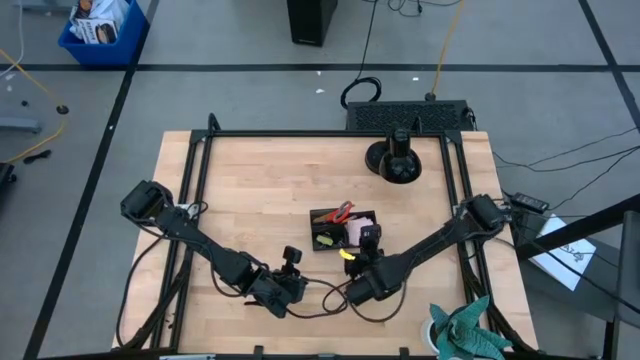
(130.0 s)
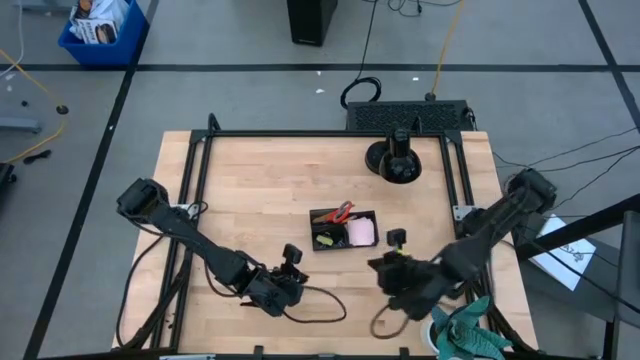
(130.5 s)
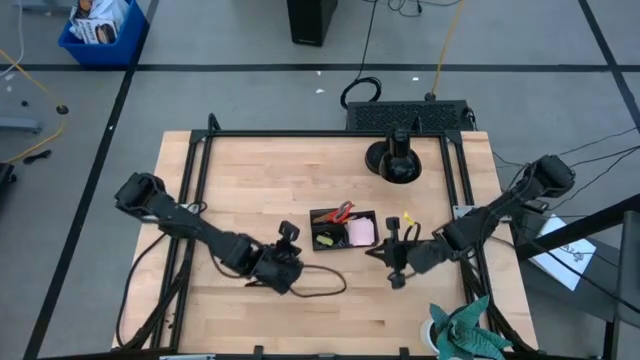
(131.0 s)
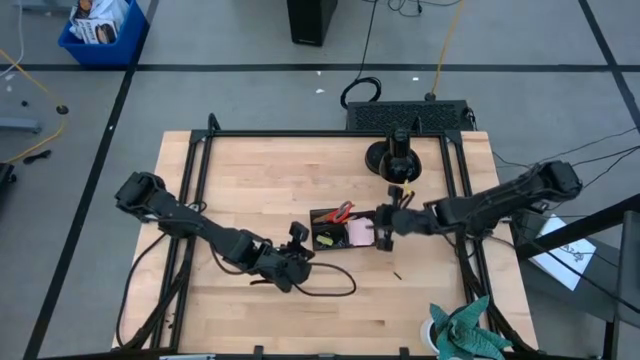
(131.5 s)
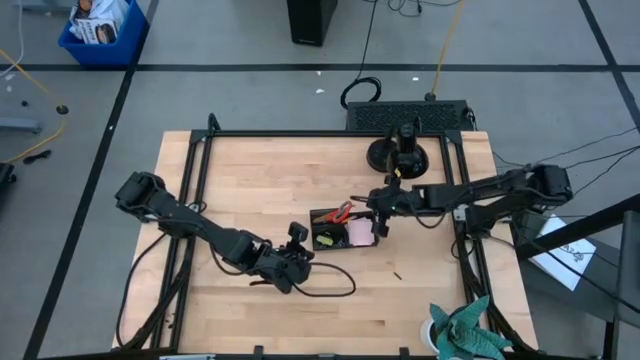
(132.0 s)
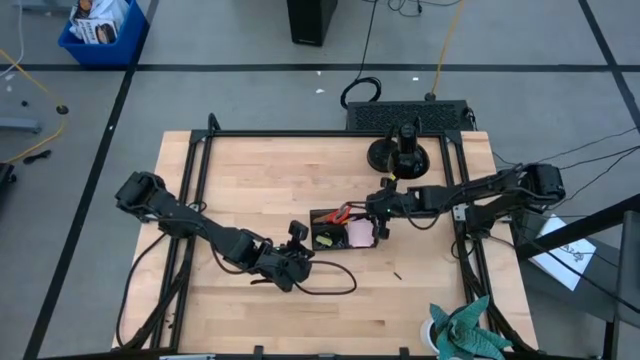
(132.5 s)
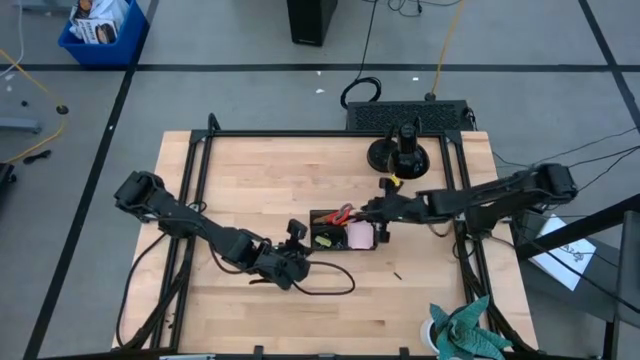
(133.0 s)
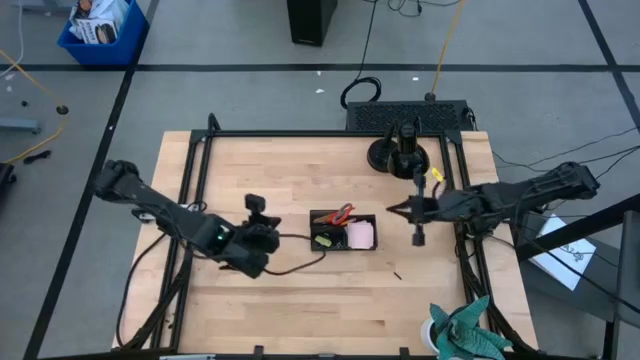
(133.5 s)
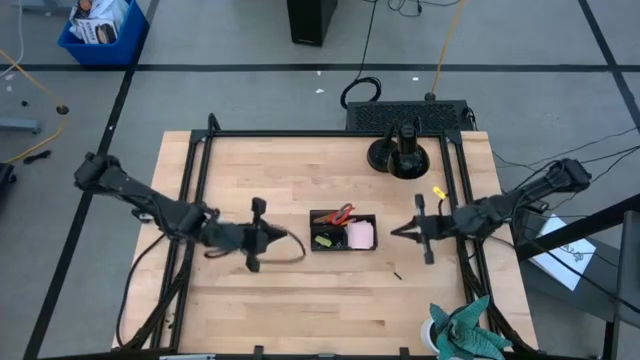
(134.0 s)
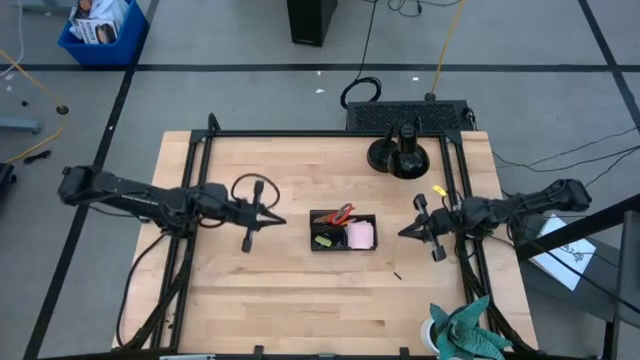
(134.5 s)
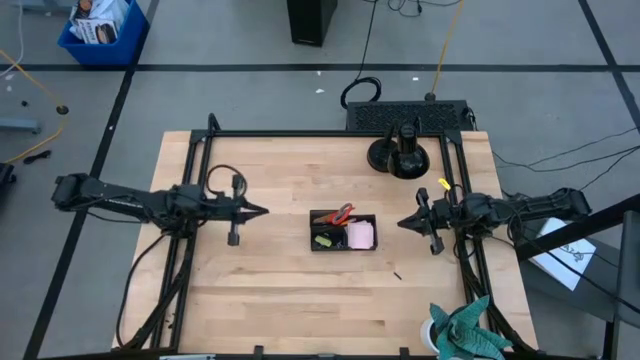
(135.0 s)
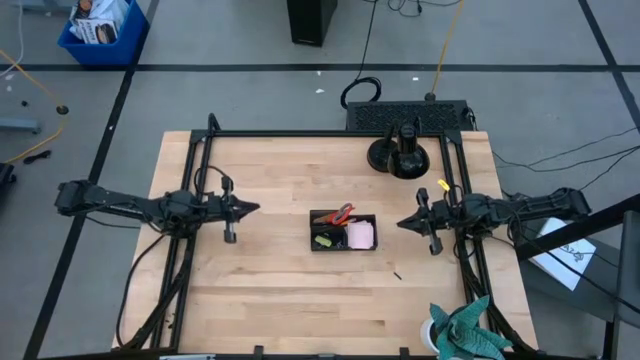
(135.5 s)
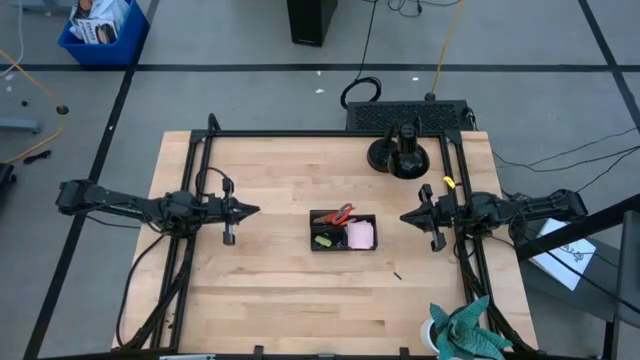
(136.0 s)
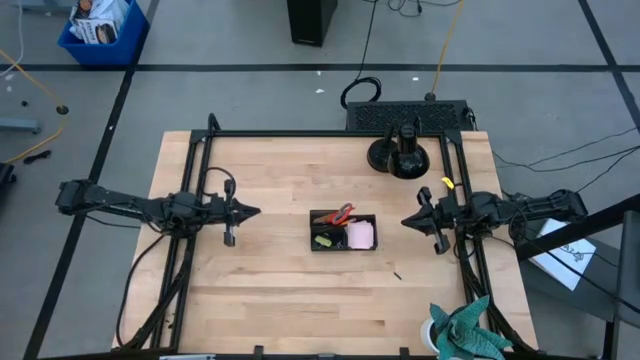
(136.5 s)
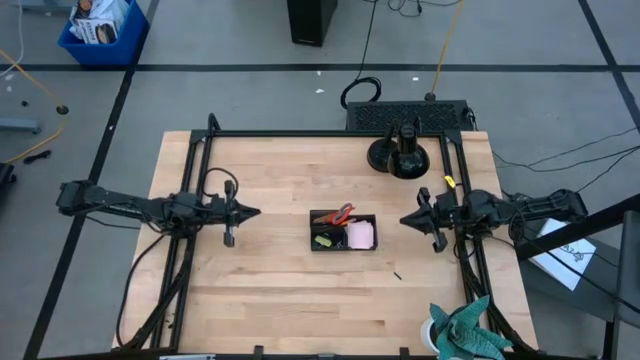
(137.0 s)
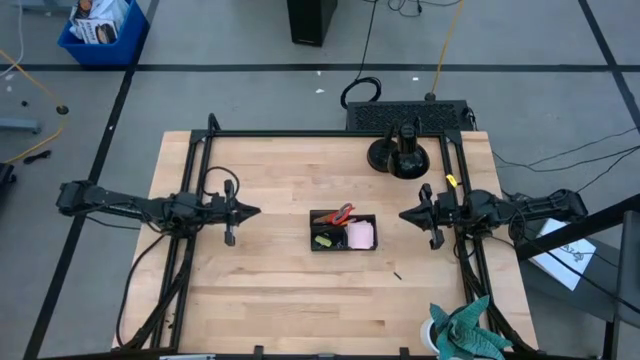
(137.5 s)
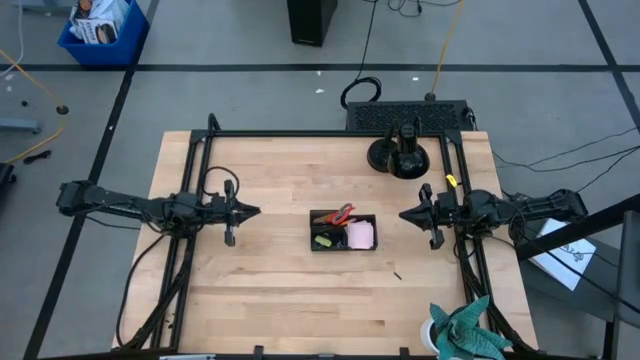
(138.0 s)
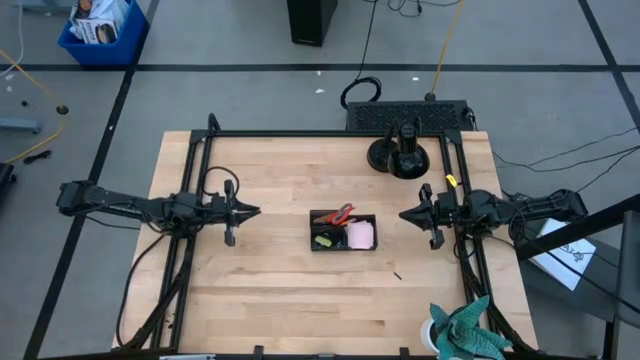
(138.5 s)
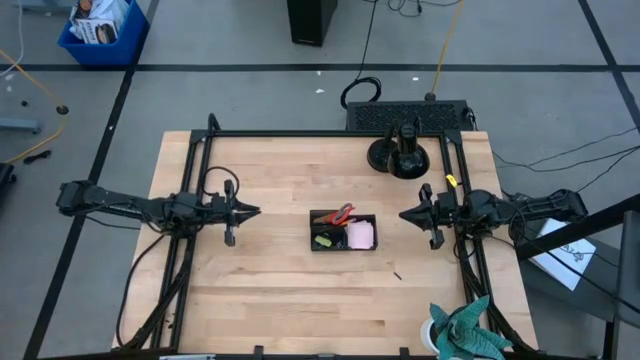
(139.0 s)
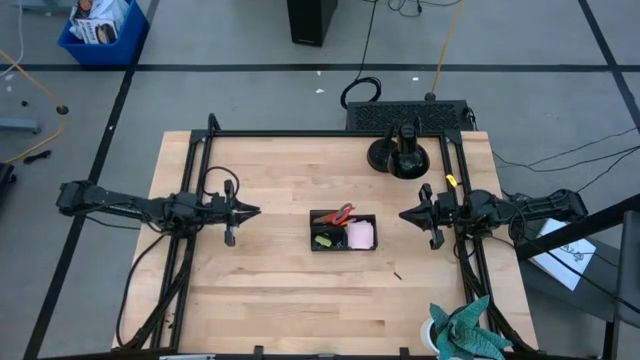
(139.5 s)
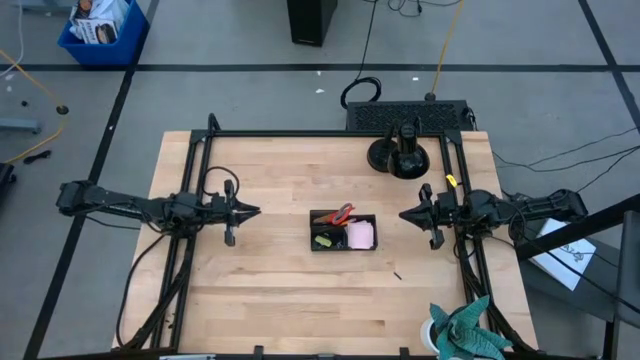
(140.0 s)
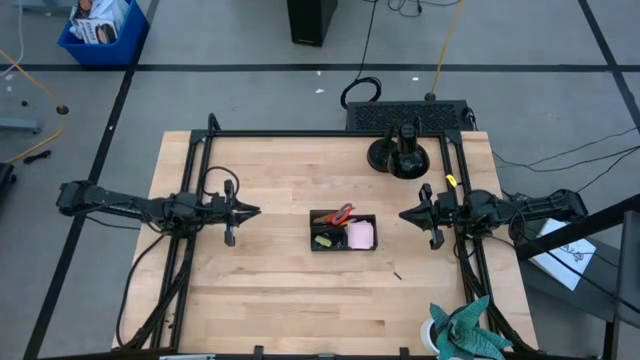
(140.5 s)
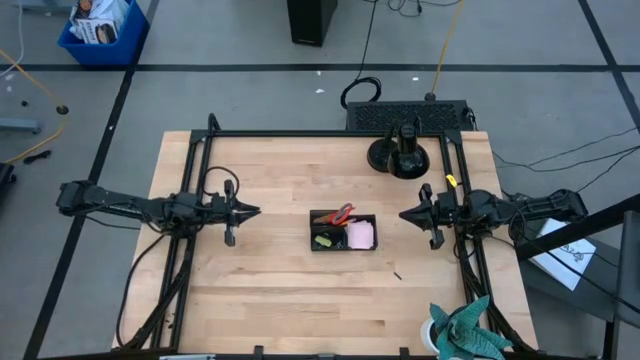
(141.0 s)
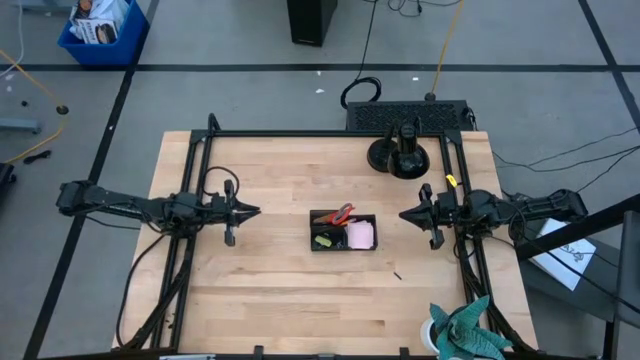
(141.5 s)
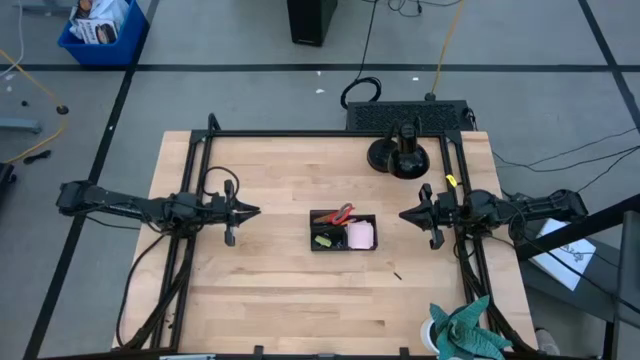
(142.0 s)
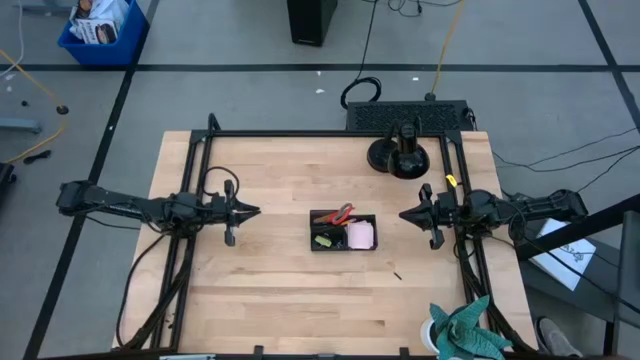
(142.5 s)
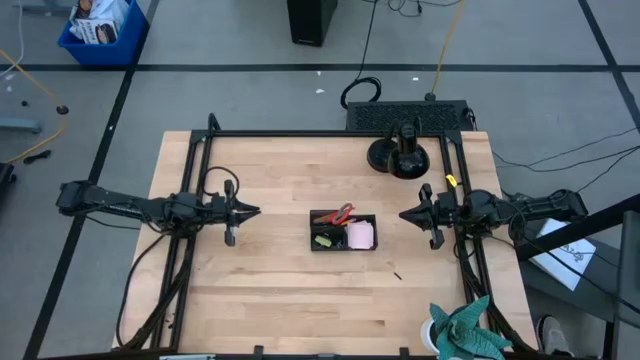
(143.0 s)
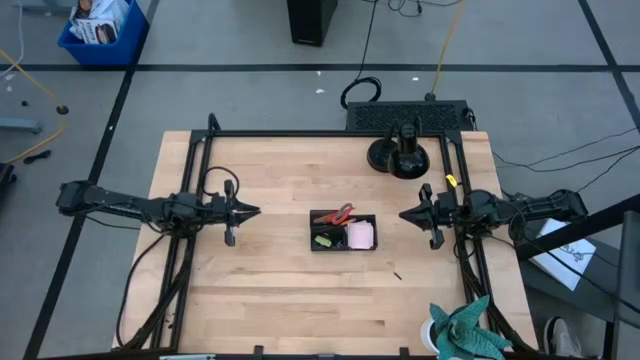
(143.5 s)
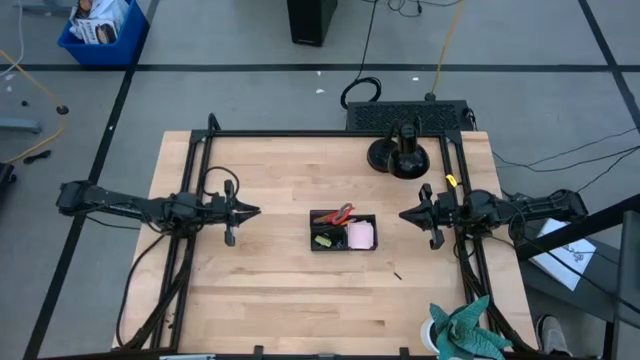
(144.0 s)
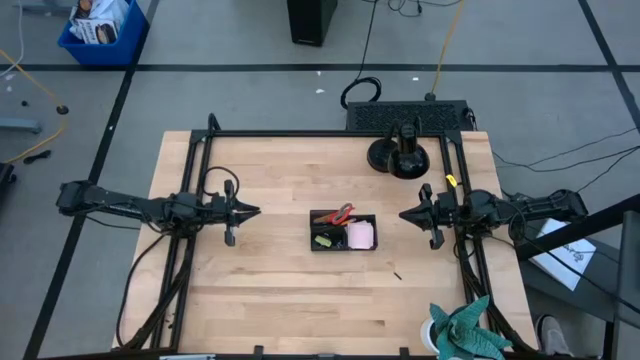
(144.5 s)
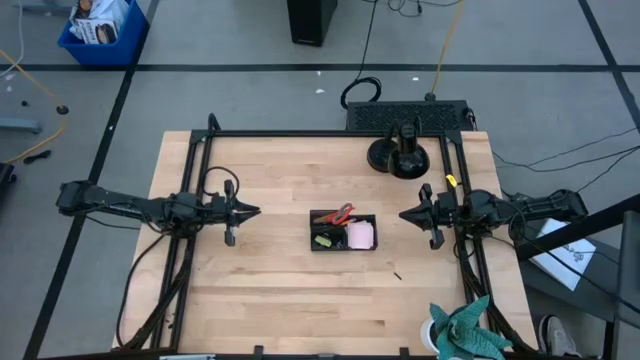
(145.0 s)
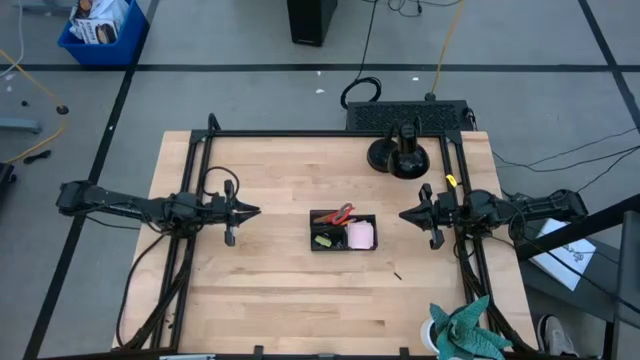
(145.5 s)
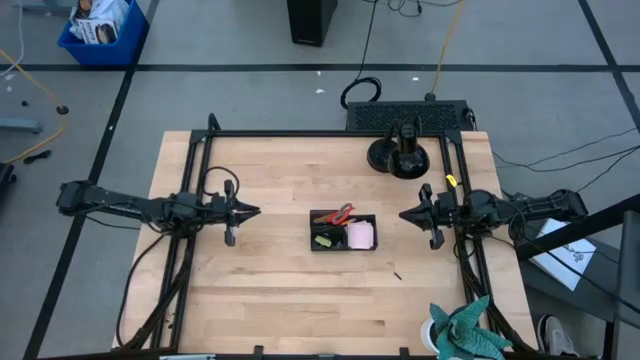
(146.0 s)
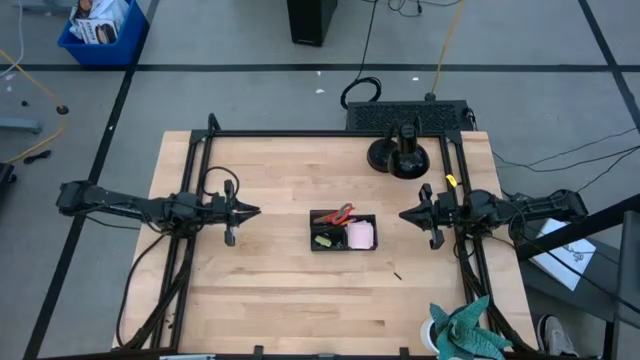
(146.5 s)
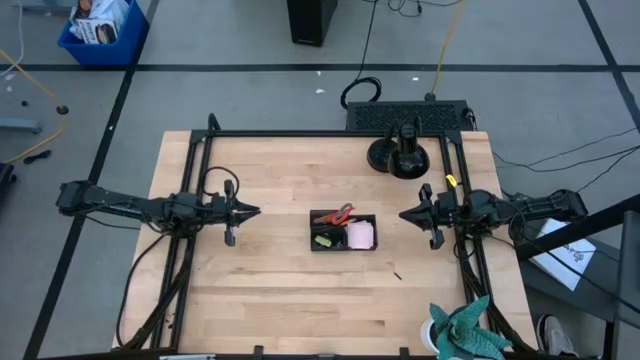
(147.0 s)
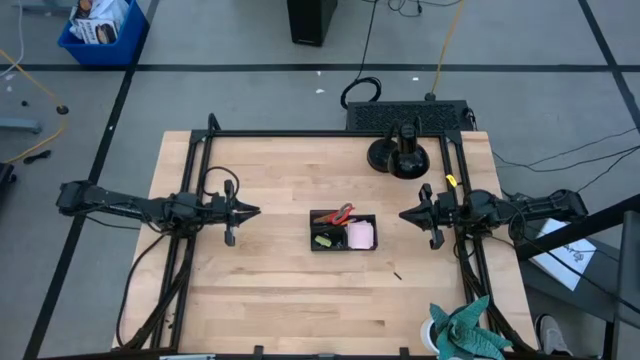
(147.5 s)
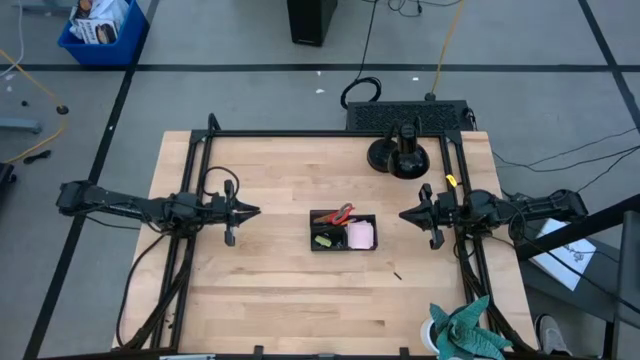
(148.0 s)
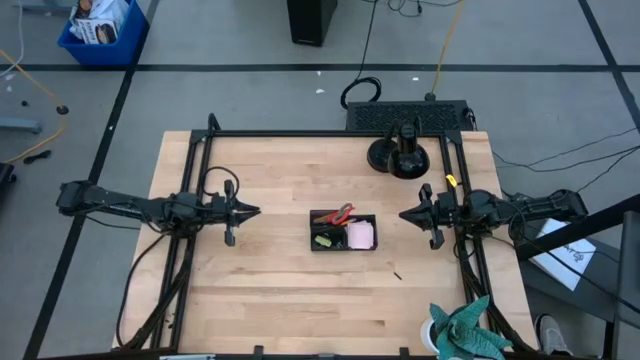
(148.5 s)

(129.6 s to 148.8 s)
Task: Pick and place office supplies into organizer
Return to Home Position

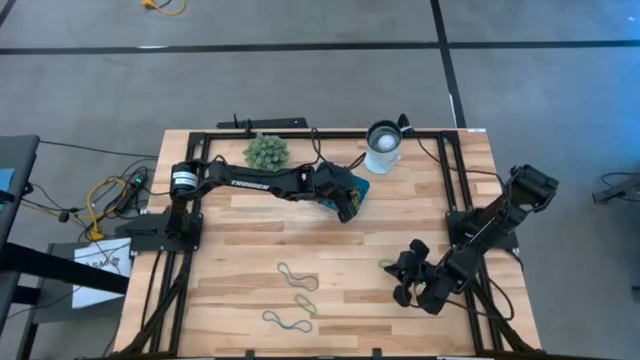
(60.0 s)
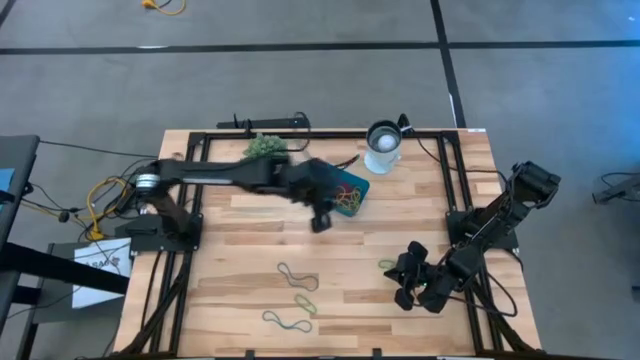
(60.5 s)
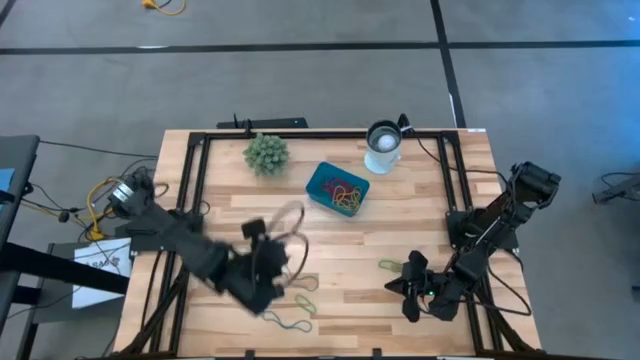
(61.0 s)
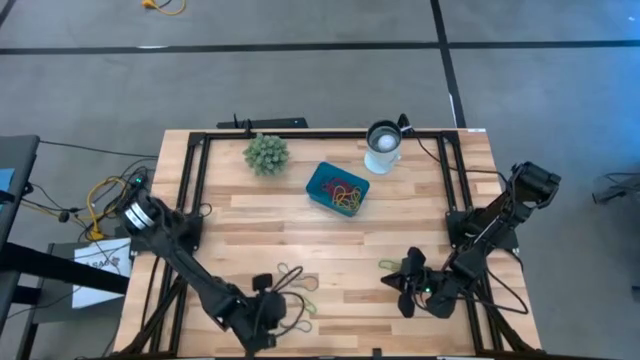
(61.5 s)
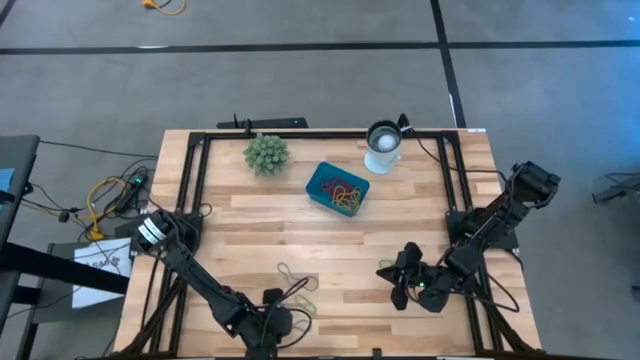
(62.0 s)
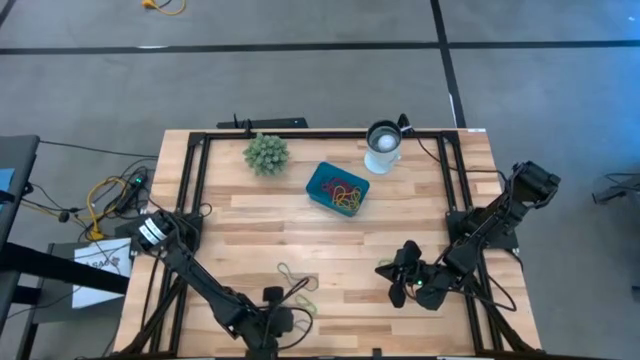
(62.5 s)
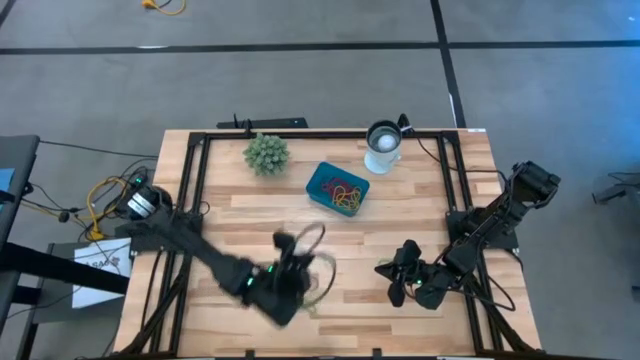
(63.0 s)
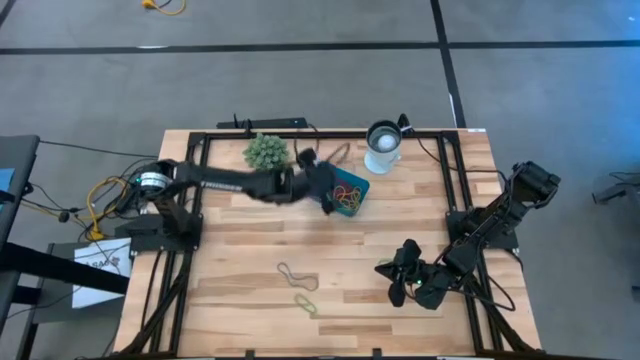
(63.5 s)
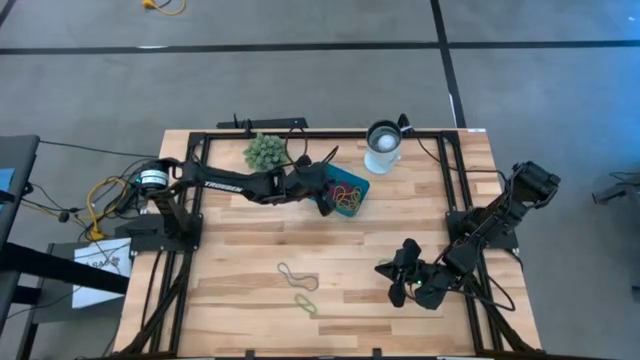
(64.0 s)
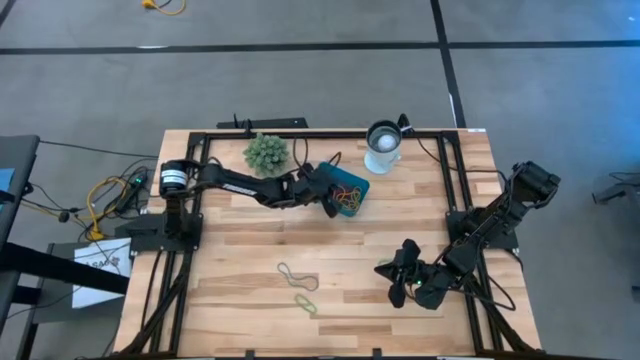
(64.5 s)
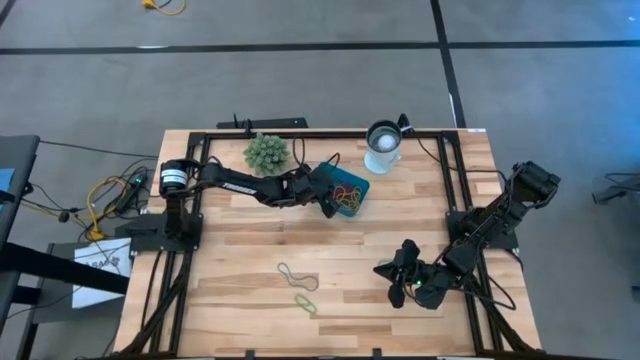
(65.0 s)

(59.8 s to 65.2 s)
Task: Pick and place items into bin
Put the blue rubber band into the blue bin
